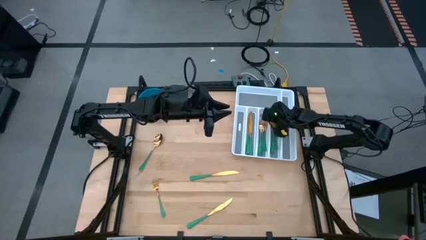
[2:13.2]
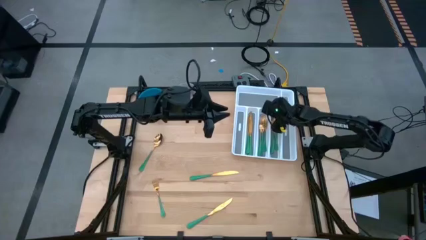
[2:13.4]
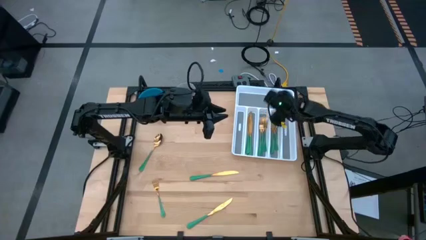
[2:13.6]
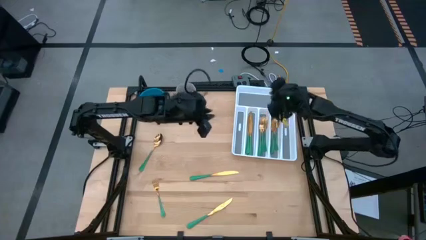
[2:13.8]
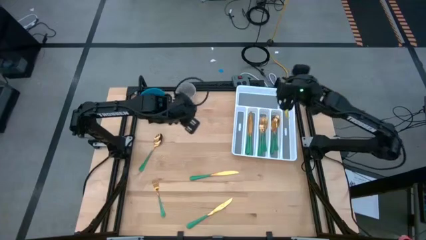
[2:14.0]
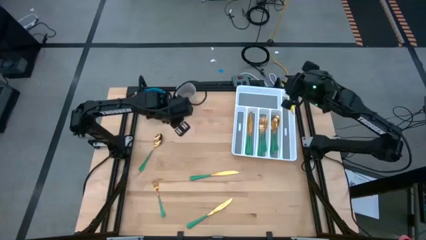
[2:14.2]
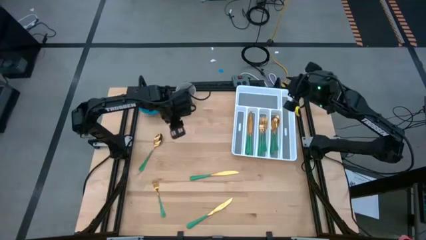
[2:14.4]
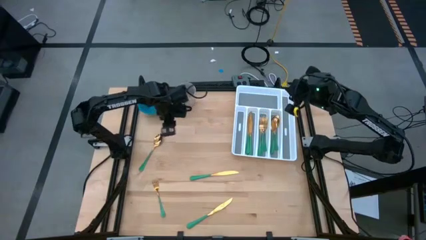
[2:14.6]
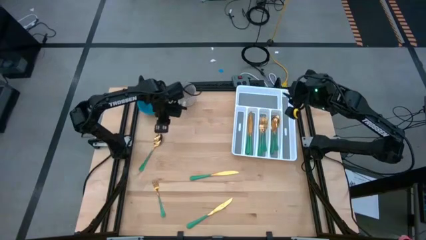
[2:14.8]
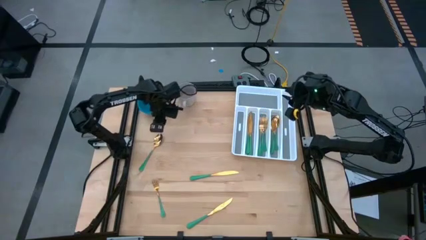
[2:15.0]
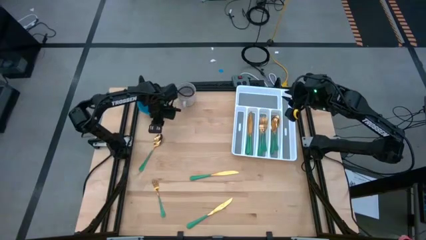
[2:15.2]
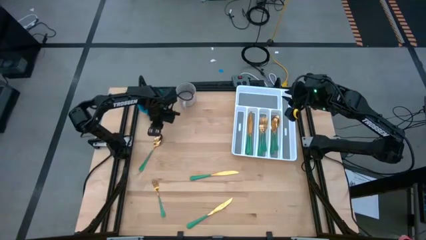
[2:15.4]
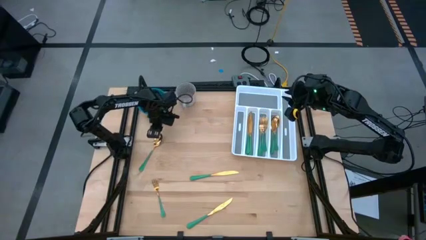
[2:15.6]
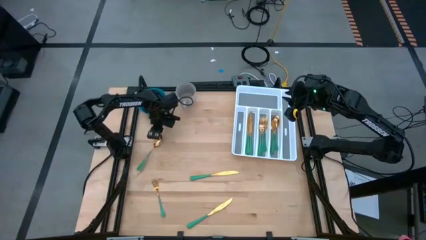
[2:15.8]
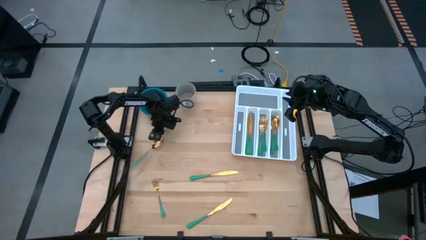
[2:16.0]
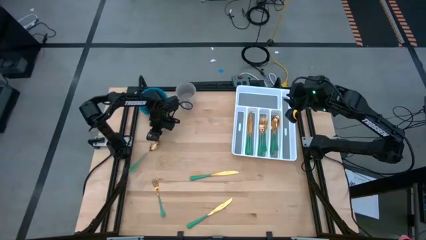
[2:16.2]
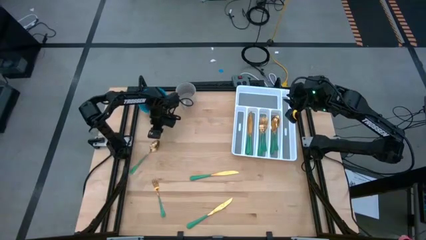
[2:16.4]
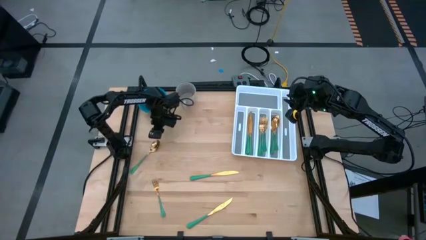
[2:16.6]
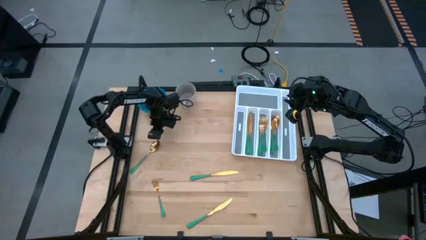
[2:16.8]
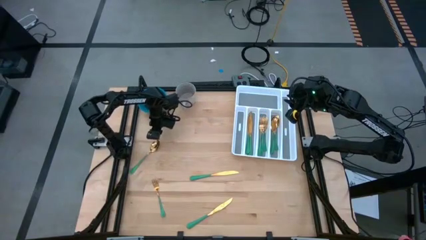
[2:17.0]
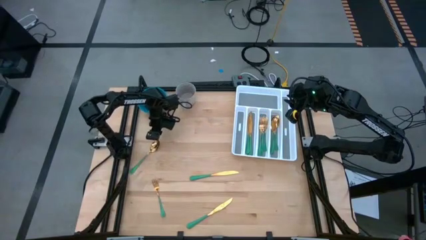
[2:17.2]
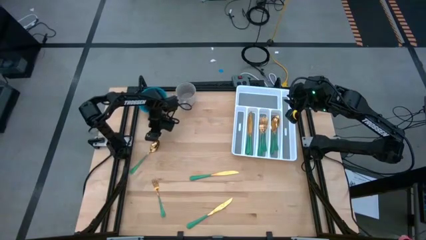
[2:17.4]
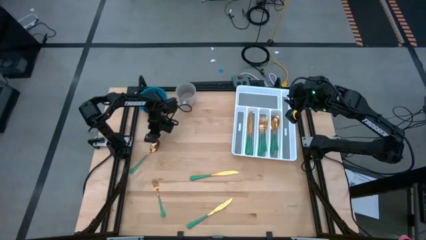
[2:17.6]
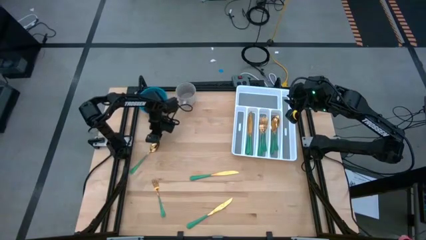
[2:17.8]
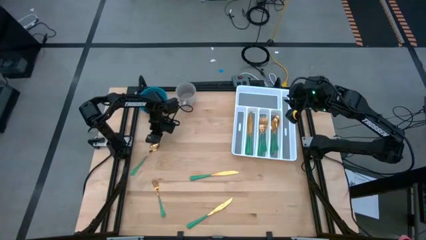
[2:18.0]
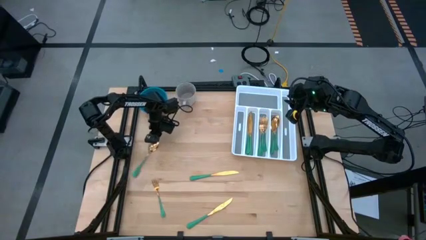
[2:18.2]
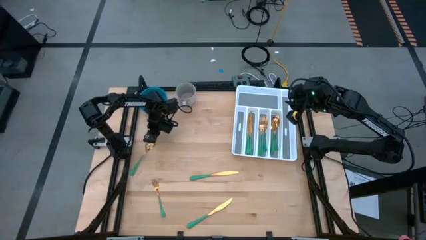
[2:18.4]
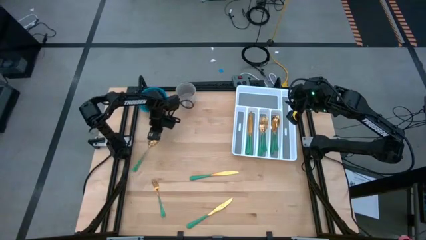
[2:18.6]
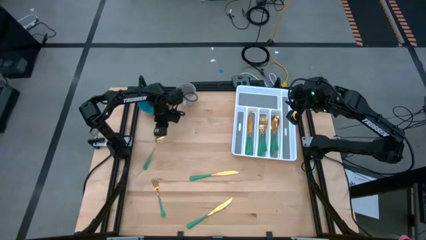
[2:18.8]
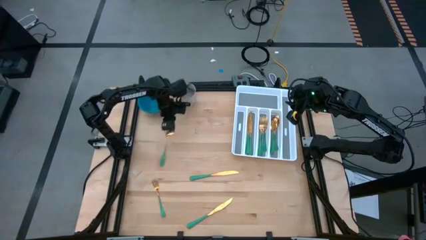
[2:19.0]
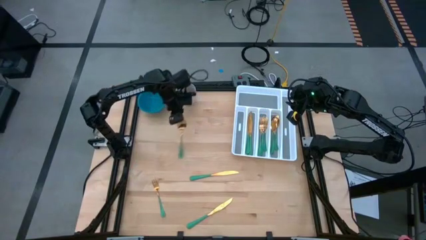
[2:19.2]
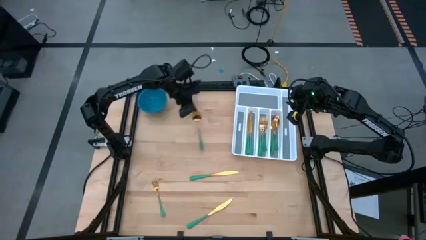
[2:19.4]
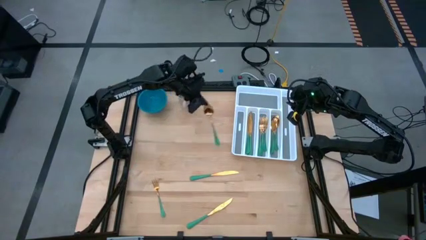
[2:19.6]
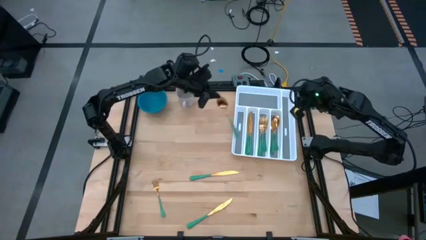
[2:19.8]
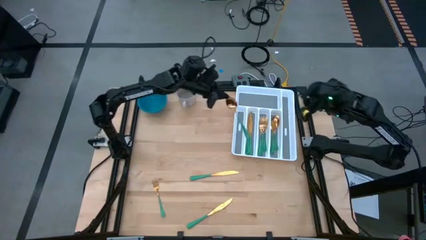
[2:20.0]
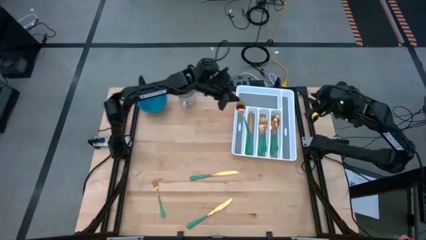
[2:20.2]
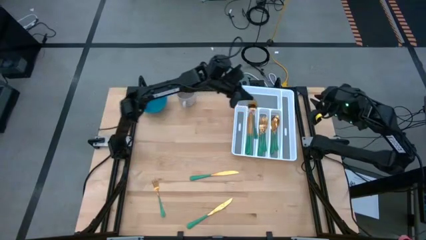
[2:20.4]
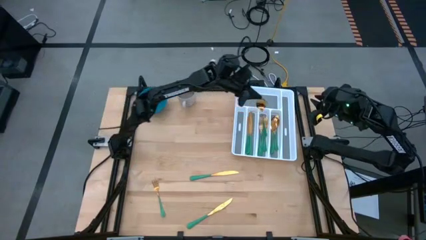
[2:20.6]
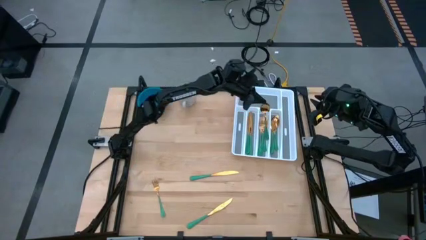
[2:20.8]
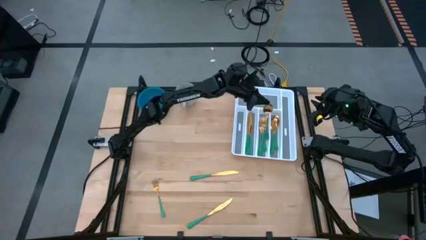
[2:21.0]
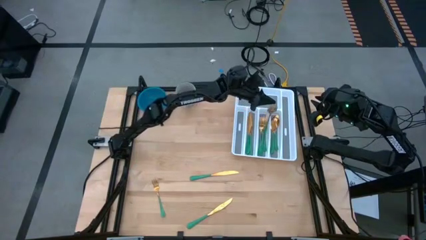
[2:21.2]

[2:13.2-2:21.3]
Task: Sort silverware
Put the green spoon into the white cutlery tray

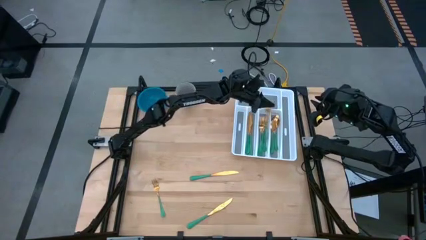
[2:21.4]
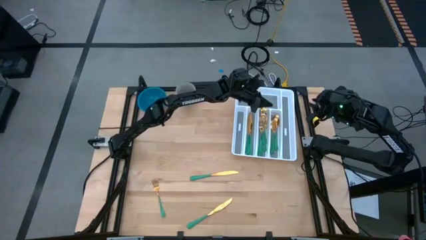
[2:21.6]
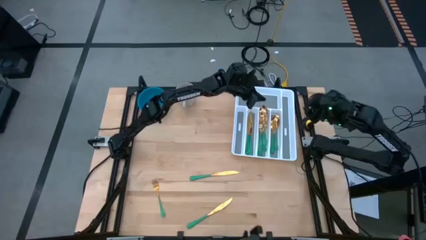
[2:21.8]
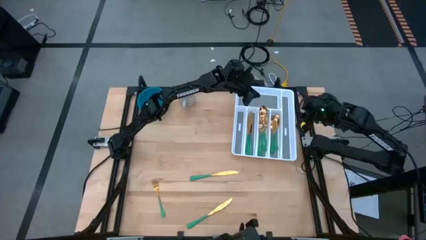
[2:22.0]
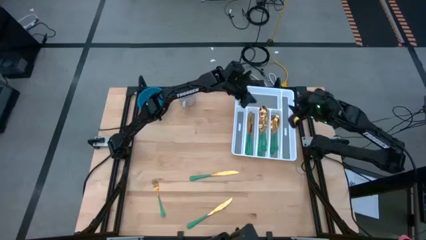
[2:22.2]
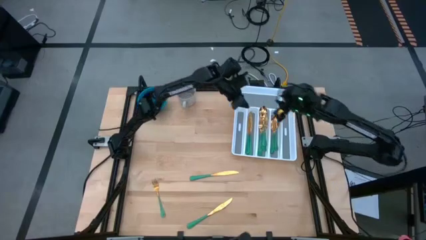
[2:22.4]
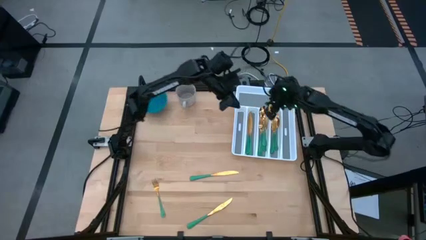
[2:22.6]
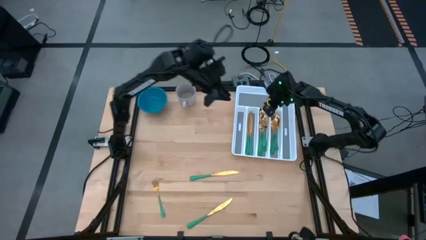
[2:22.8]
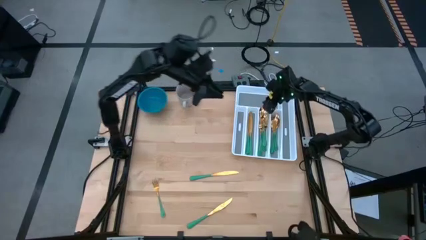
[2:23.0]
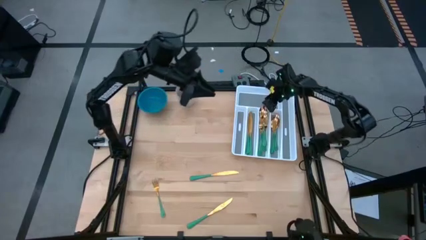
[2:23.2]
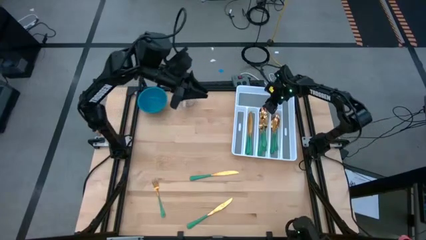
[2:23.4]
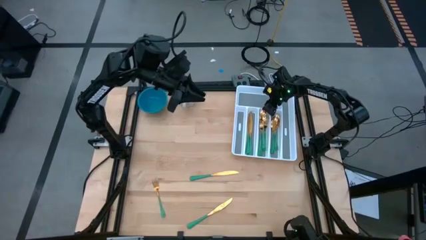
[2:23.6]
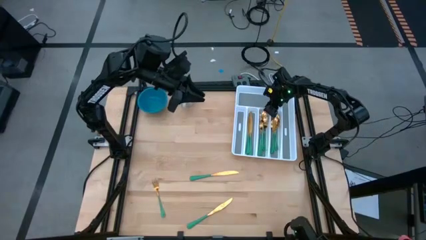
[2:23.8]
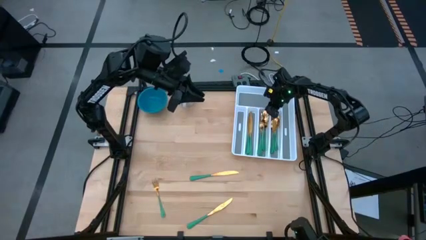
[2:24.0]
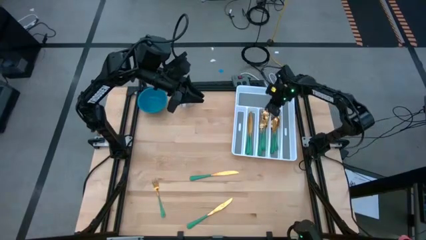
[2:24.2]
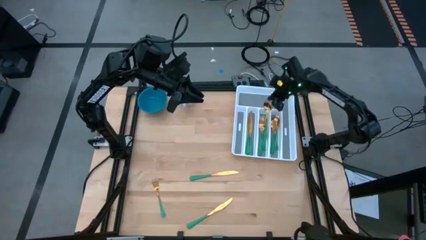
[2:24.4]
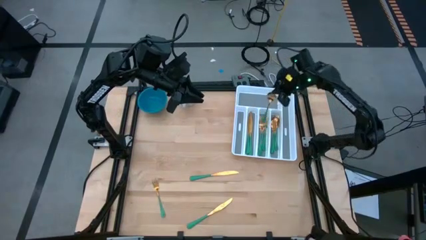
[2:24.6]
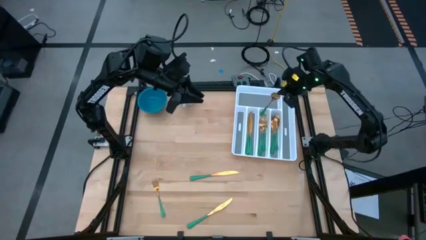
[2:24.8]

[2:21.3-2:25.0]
Put the green spoon into the white cutlery tray

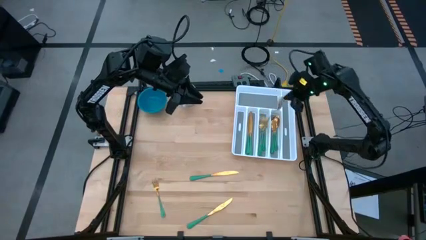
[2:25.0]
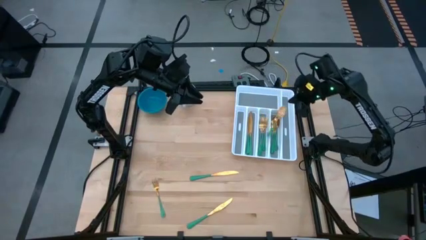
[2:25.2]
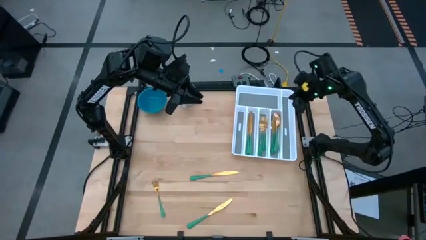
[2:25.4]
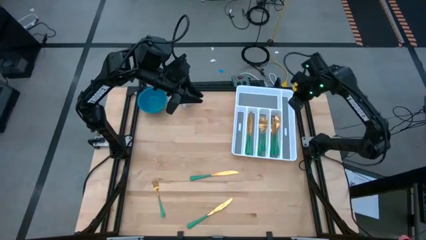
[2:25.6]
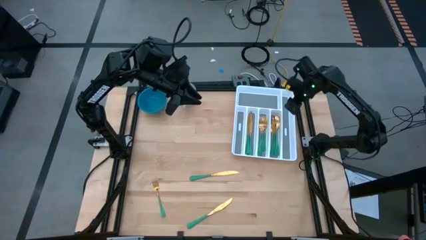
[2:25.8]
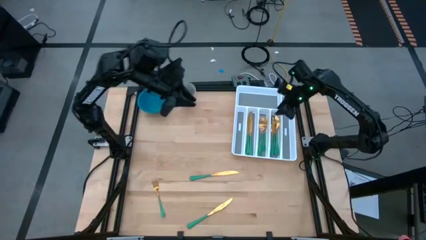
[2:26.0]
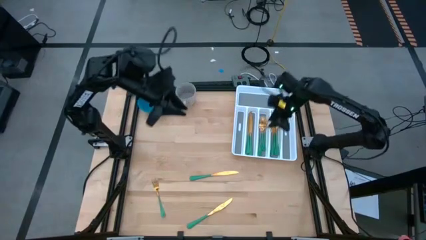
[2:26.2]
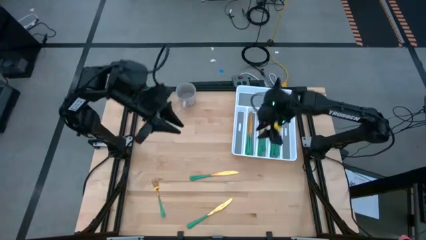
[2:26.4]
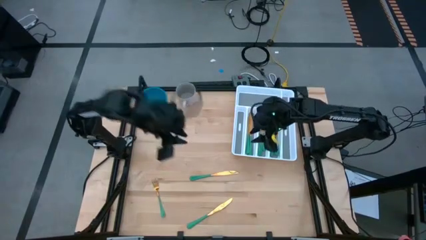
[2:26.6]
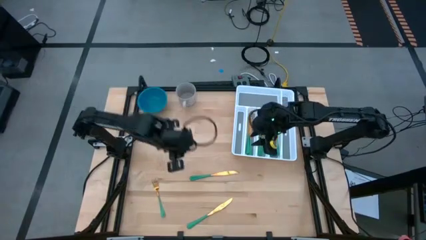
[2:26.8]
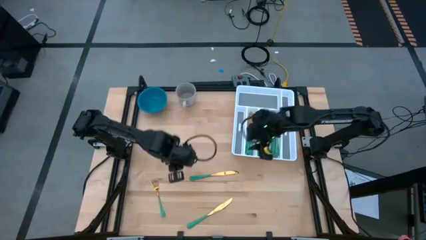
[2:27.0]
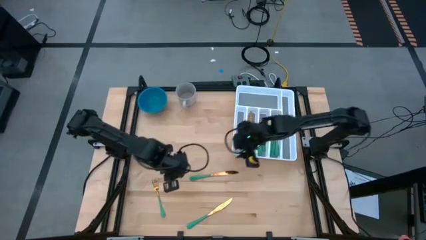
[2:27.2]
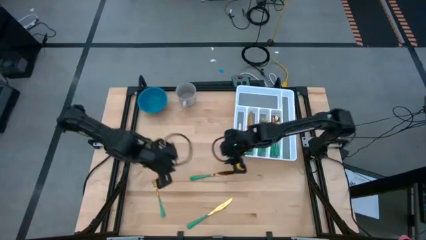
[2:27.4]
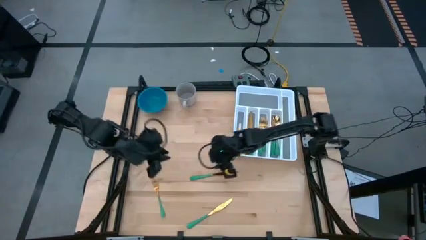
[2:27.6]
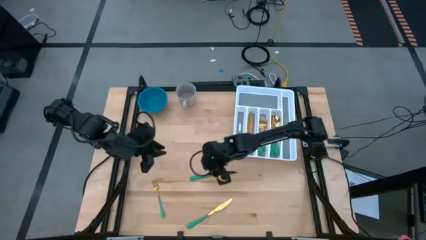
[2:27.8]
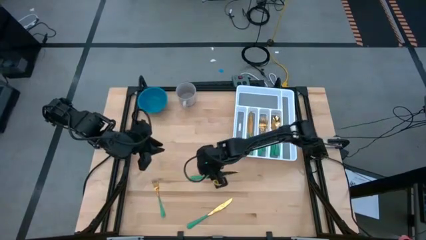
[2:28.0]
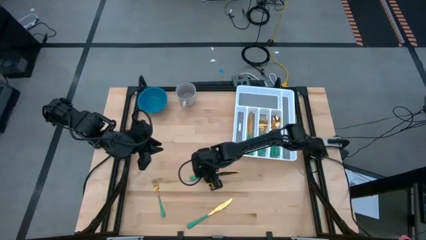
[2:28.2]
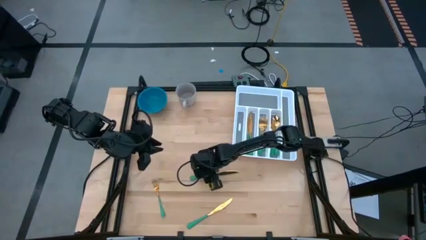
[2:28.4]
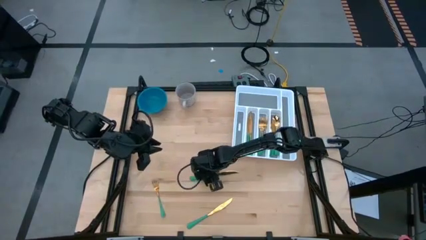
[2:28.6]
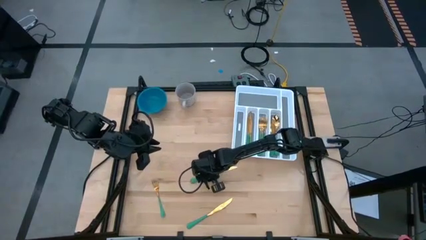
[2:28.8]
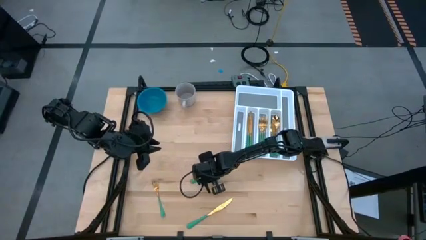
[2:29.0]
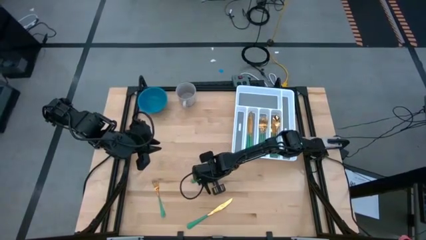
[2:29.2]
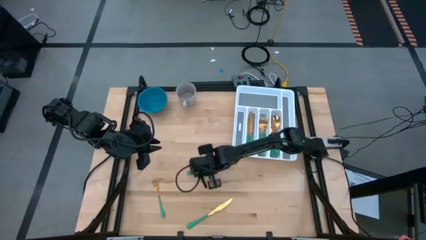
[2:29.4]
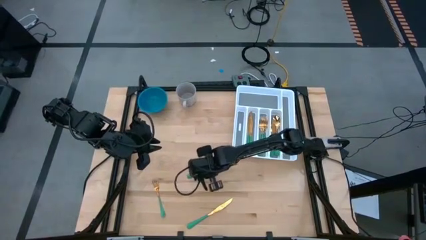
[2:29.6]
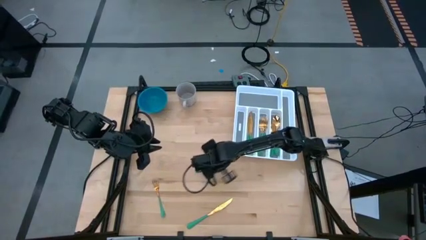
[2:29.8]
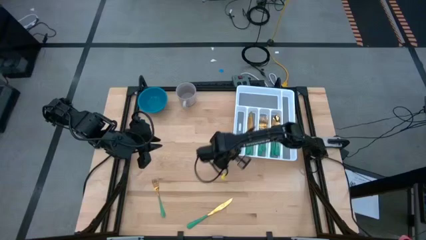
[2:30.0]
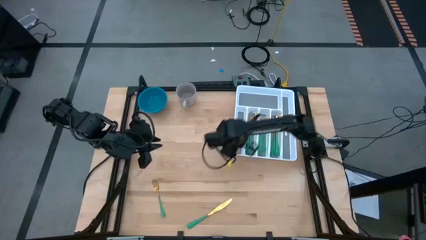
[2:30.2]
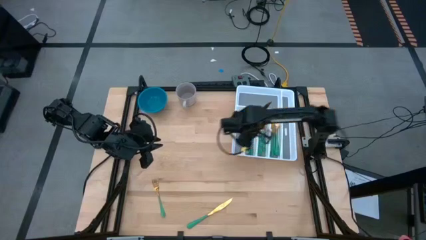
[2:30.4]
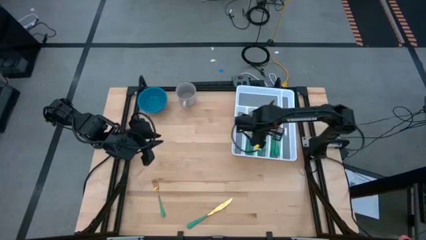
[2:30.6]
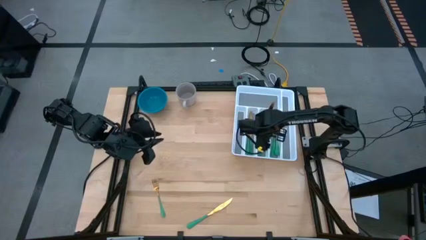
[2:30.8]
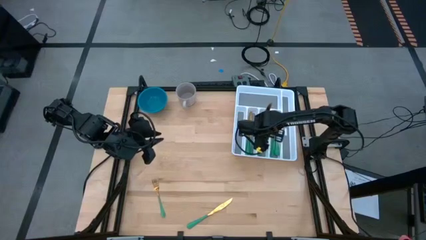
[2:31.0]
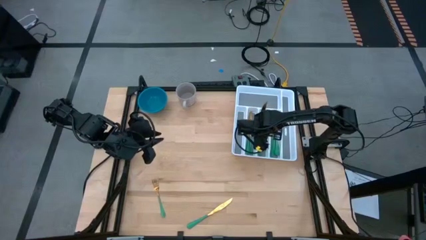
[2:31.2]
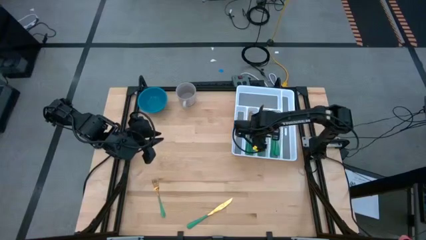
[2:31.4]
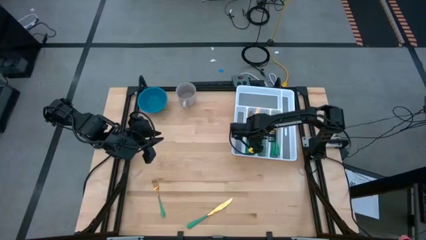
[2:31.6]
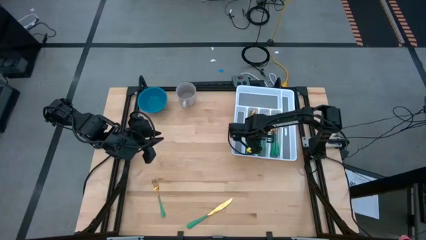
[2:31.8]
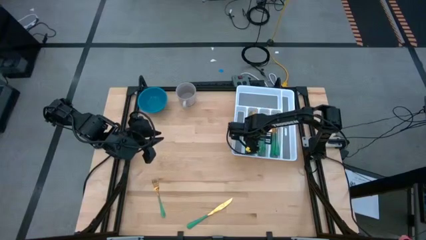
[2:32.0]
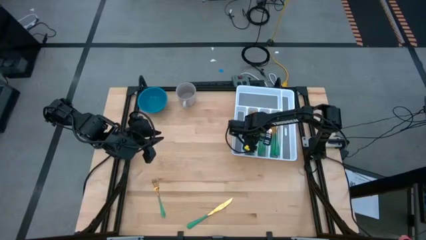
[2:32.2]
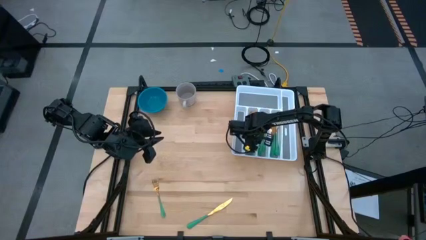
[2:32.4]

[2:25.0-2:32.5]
Put the green table knife into the white cutlery tray
